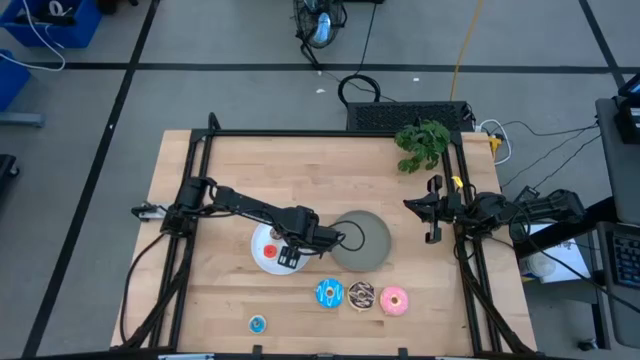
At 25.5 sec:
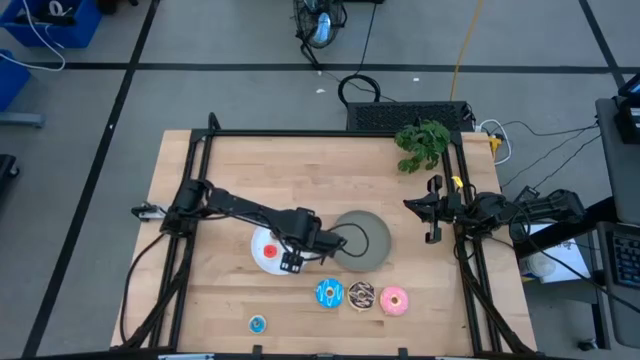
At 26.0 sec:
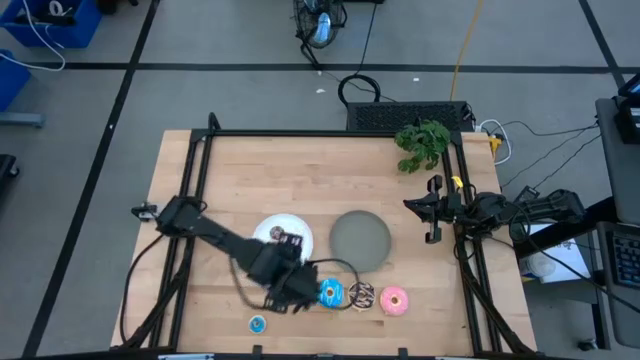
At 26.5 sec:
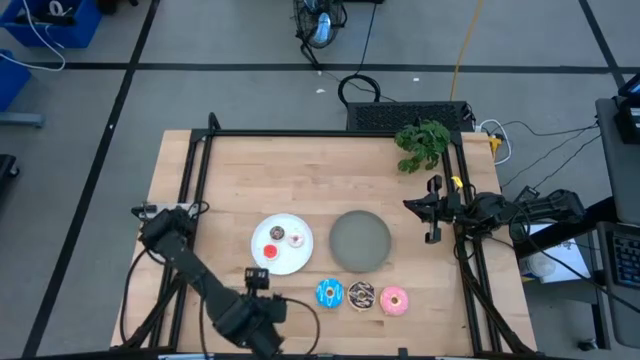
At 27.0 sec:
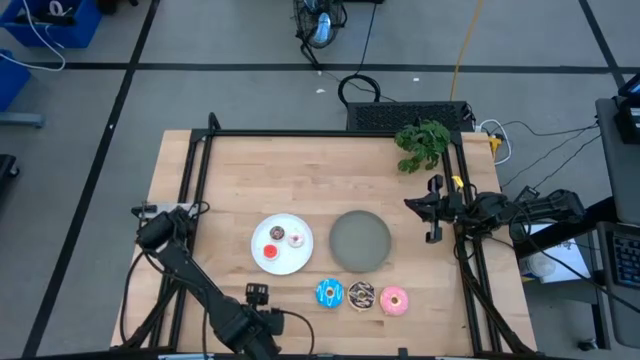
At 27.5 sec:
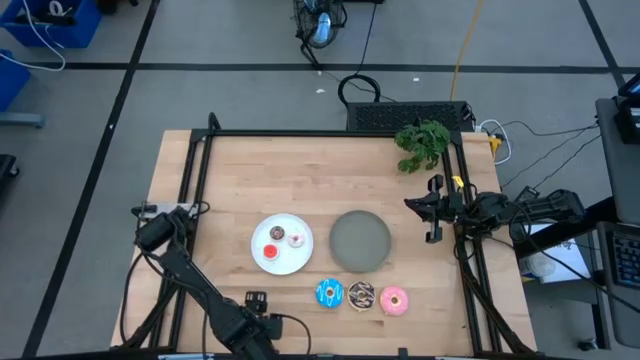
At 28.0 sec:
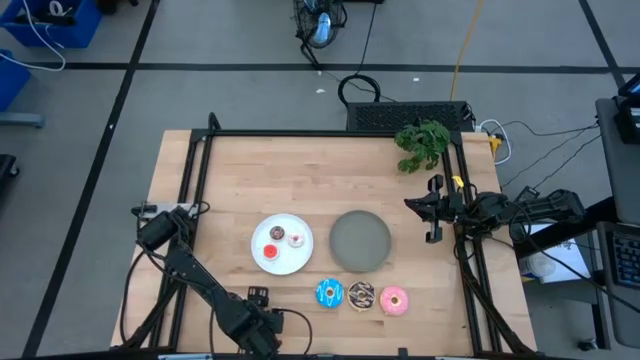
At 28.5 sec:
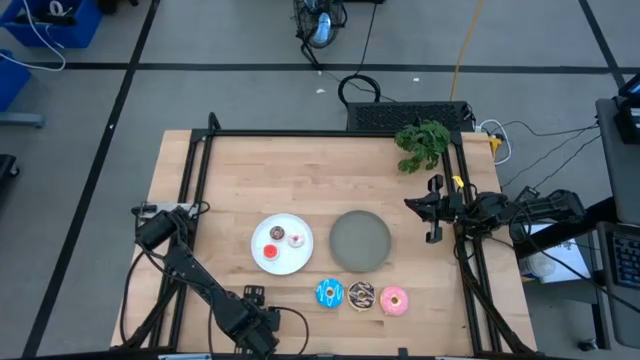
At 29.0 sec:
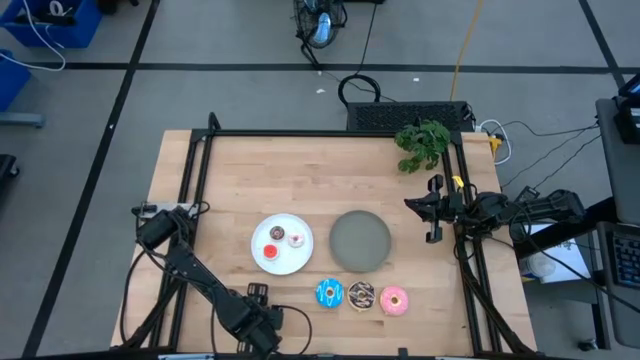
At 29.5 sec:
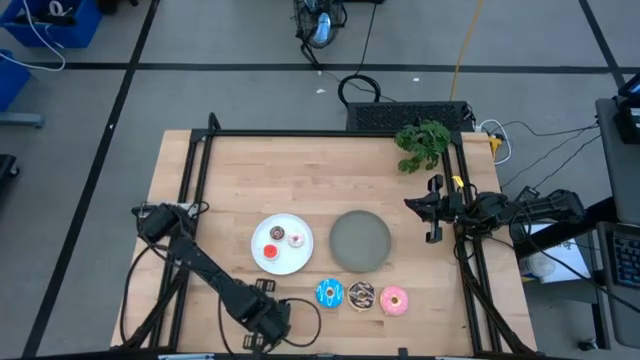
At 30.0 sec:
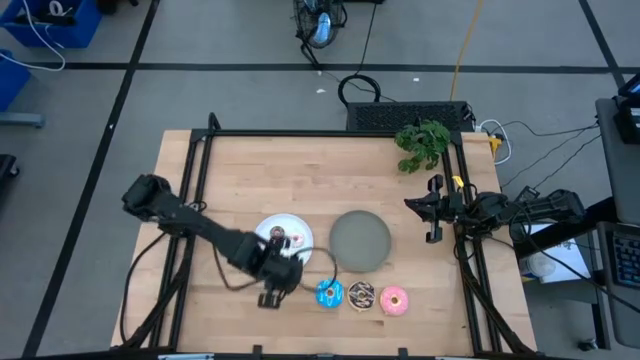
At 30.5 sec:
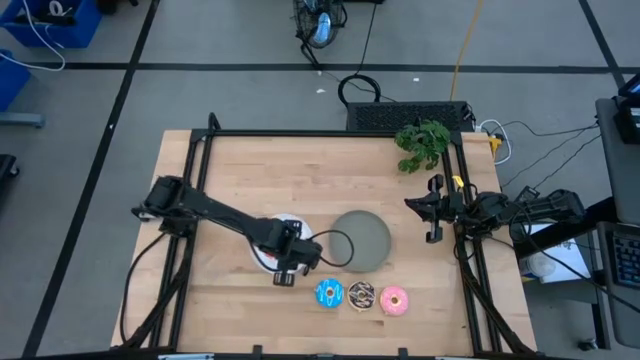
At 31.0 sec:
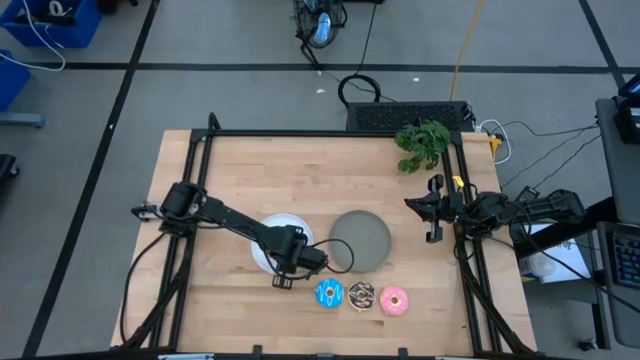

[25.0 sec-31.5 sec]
Task: Pick & Place donuts
Put the small blue donut on the white plate

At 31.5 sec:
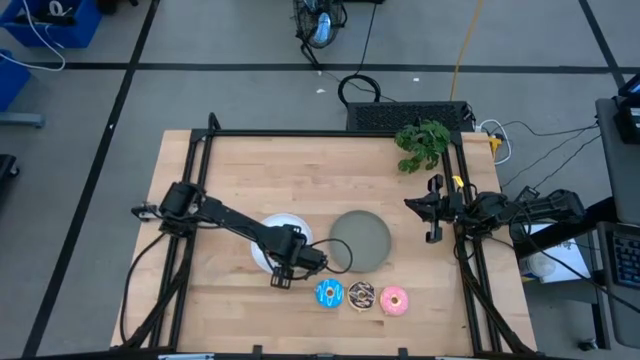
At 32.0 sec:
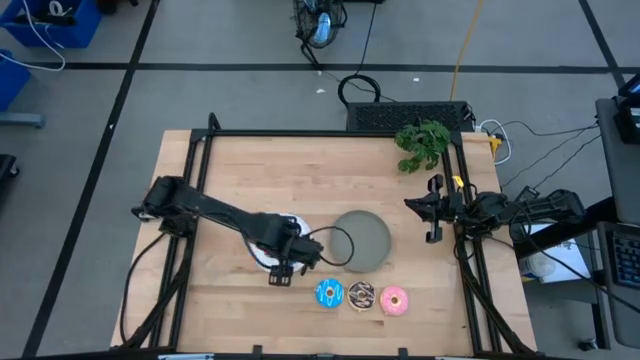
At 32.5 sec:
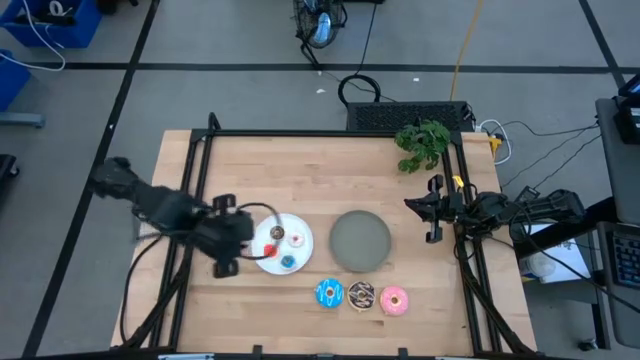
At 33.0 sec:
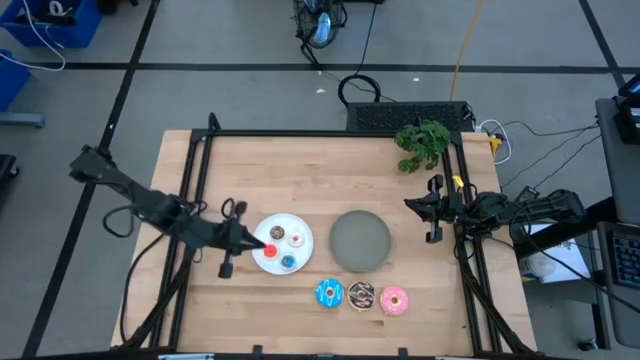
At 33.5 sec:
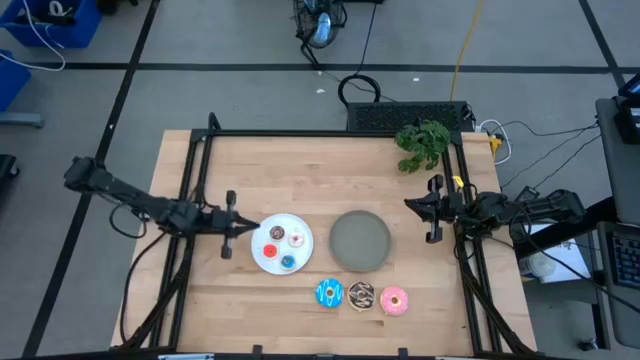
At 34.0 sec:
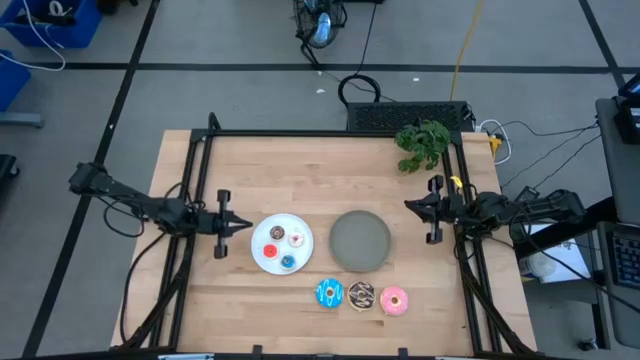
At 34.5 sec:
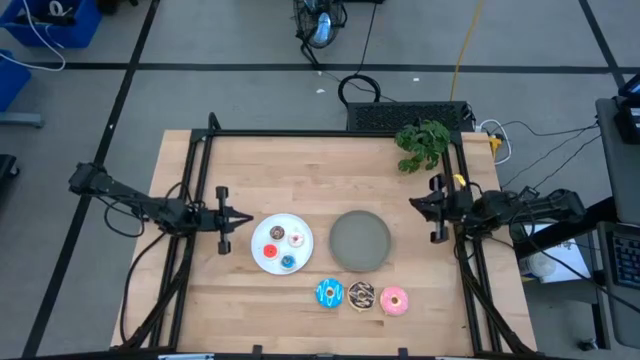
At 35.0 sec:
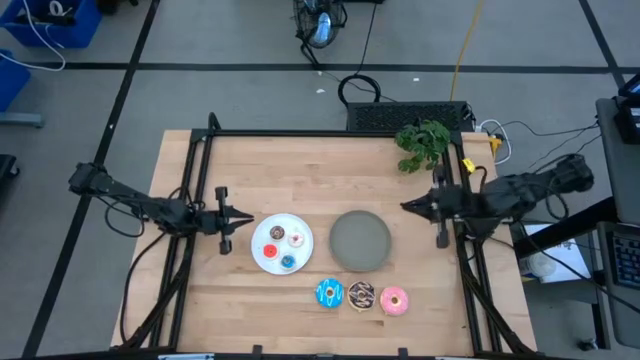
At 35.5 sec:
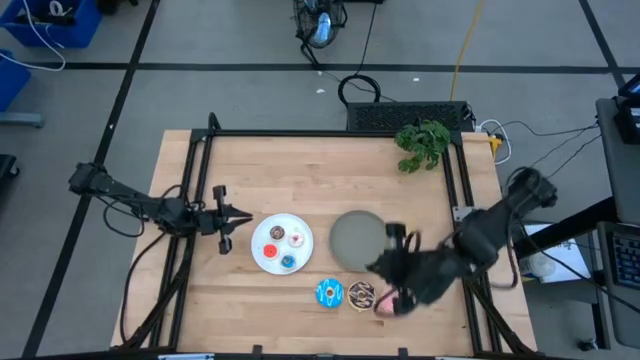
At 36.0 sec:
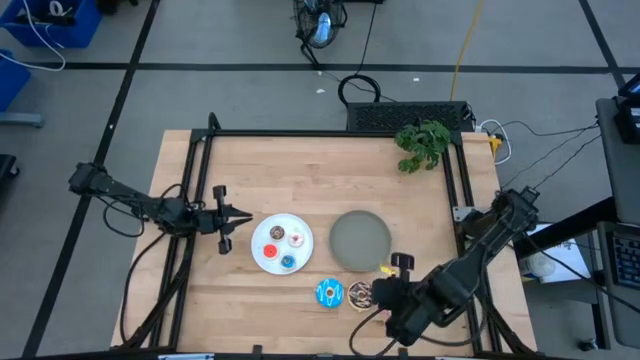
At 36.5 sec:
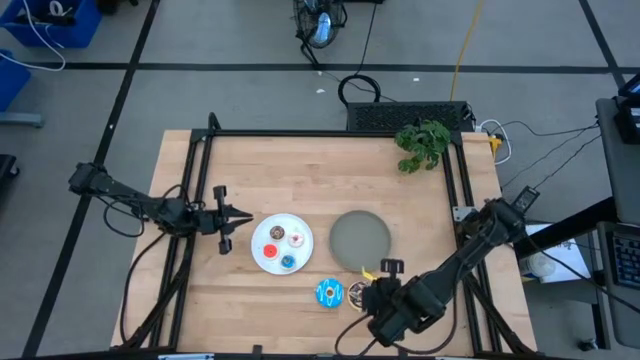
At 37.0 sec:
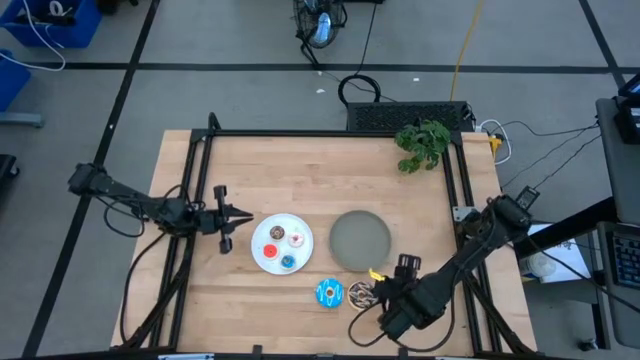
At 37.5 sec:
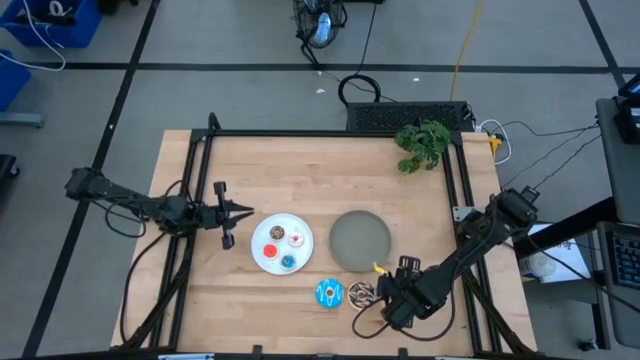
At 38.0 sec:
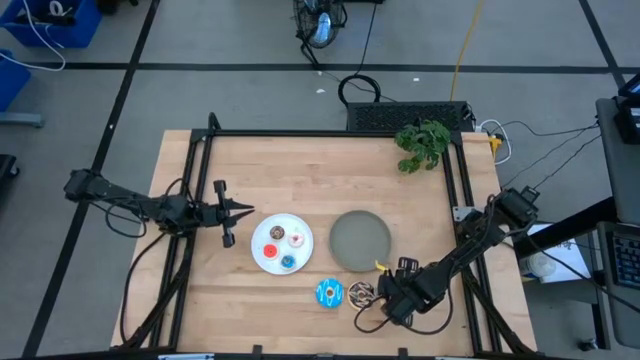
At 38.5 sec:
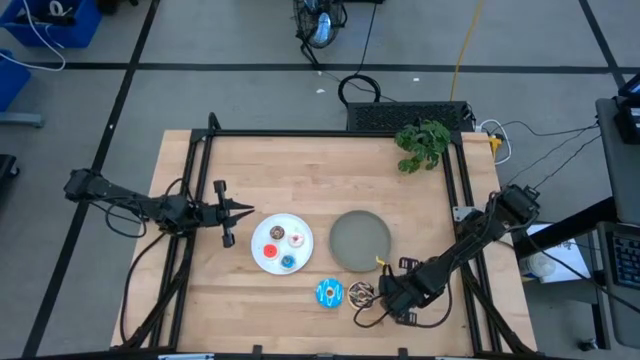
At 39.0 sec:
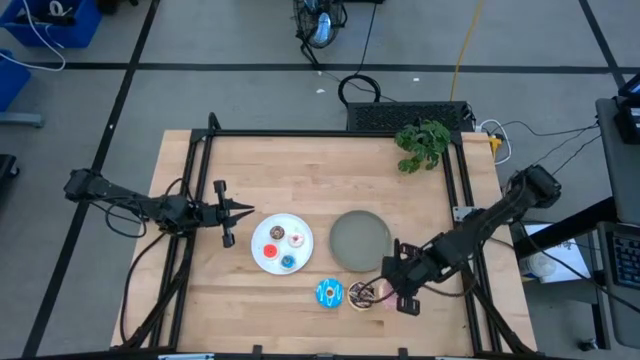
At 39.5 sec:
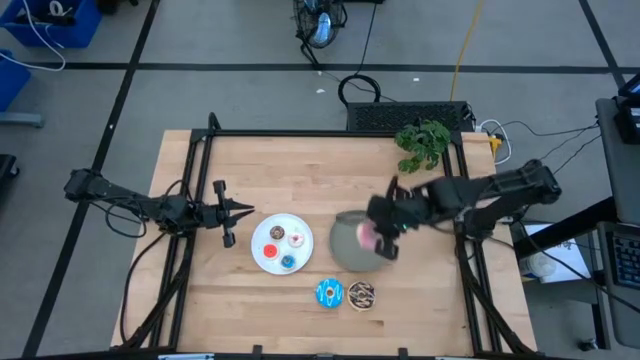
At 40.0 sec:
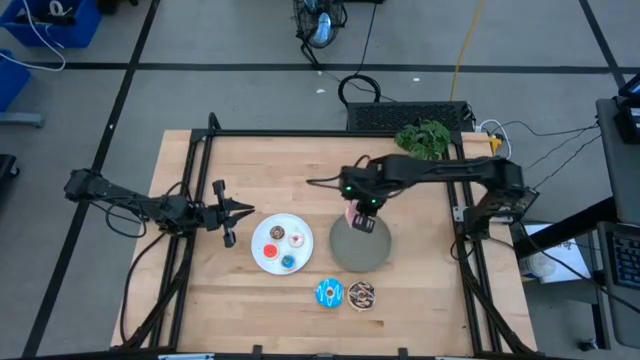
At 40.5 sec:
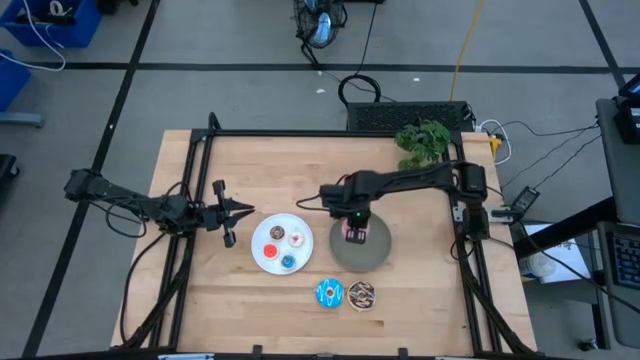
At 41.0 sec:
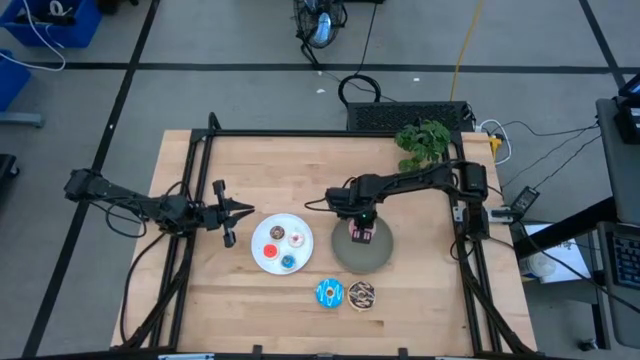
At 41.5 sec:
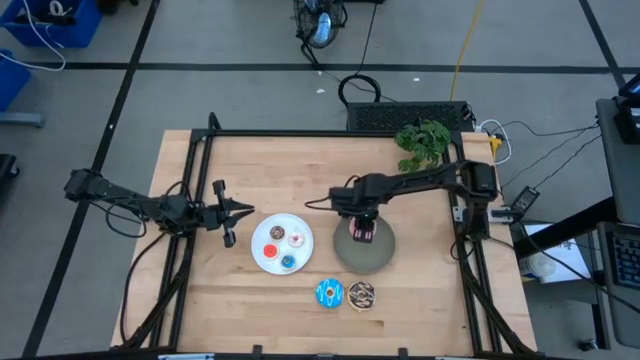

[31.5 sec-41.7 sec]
Put the big pink donut on the gray plate

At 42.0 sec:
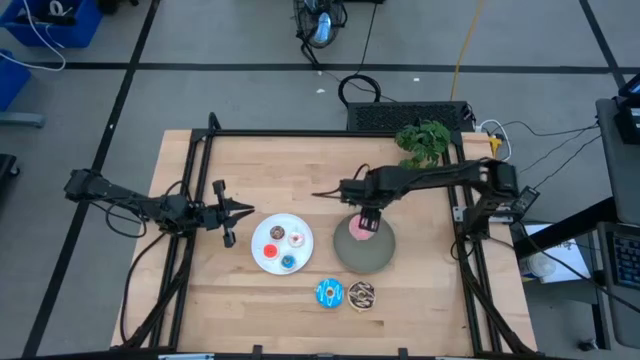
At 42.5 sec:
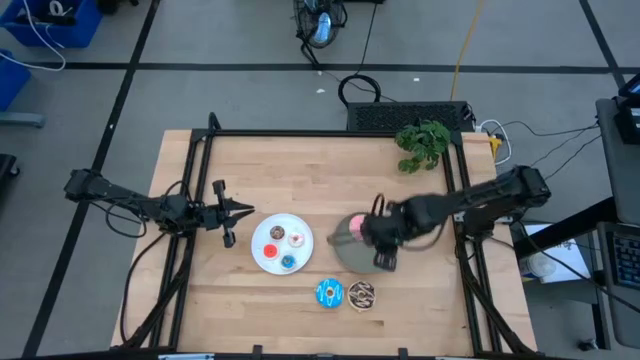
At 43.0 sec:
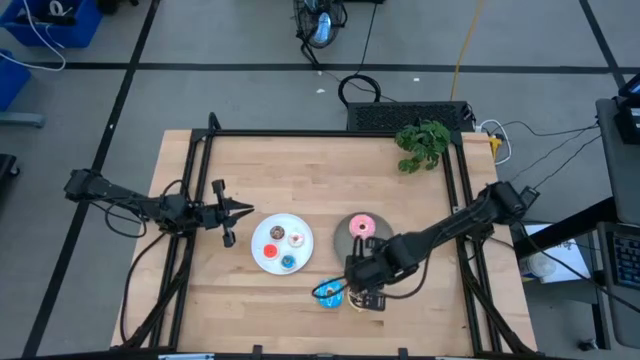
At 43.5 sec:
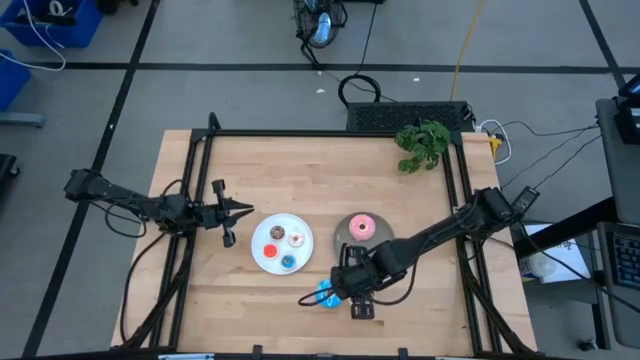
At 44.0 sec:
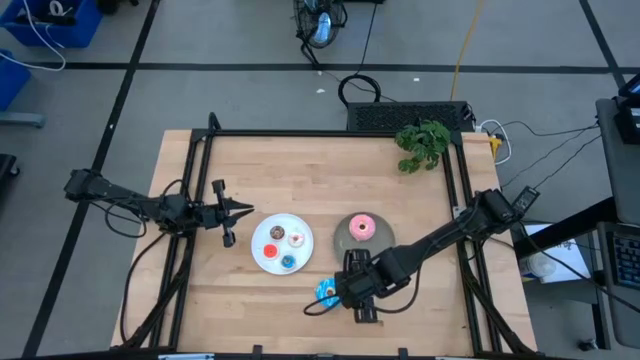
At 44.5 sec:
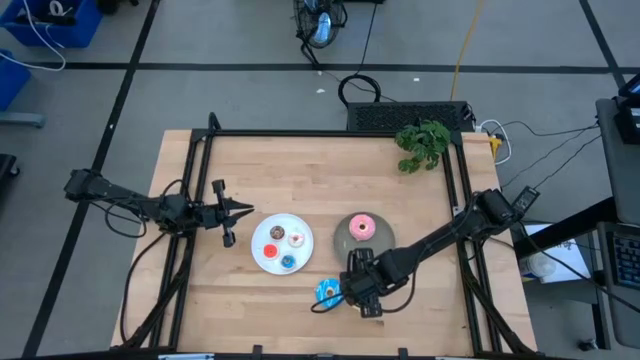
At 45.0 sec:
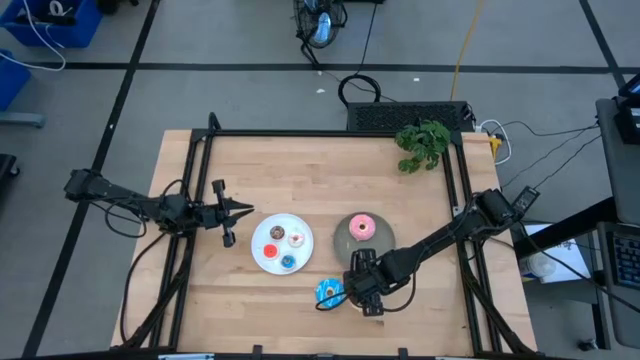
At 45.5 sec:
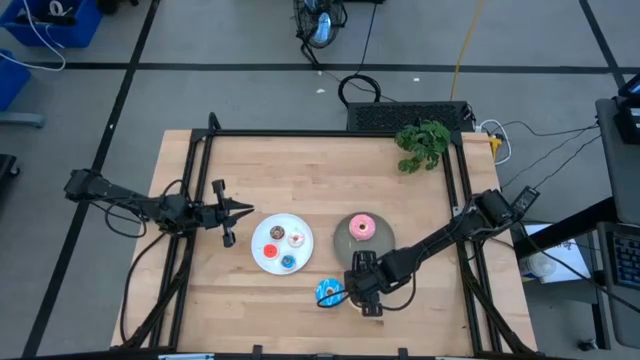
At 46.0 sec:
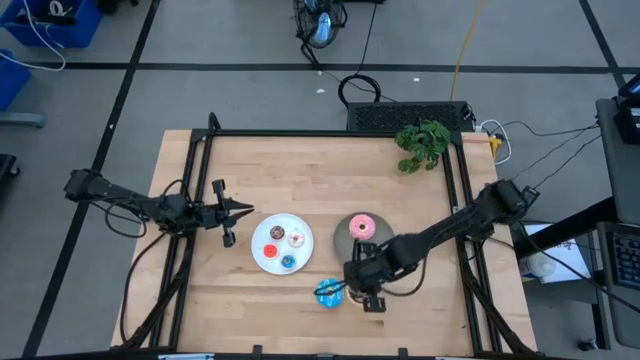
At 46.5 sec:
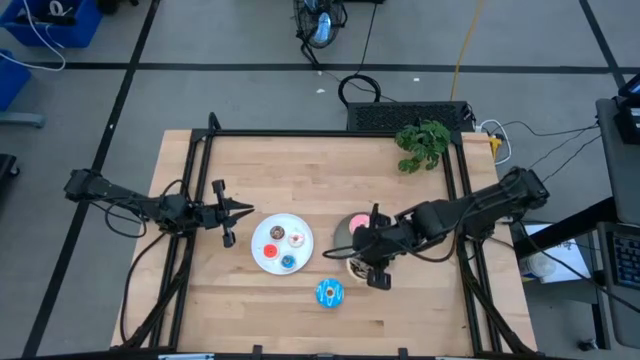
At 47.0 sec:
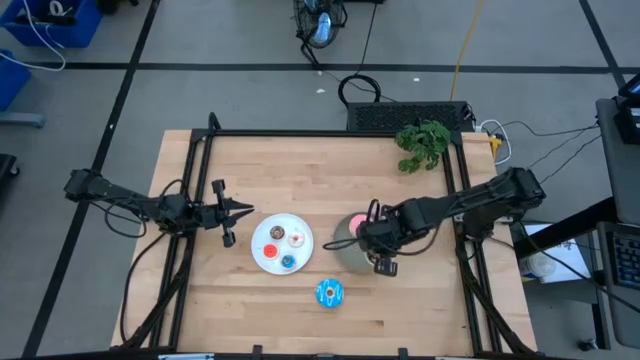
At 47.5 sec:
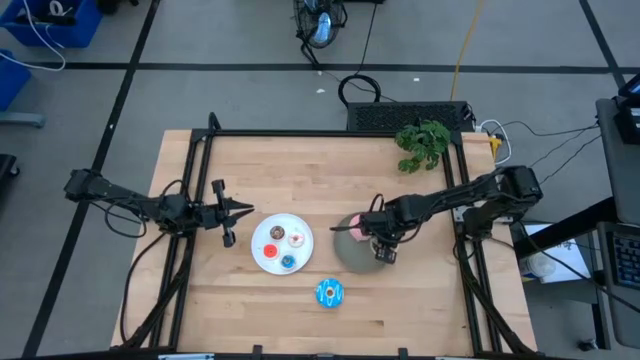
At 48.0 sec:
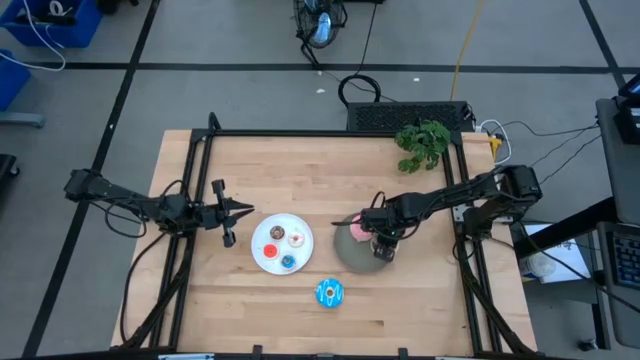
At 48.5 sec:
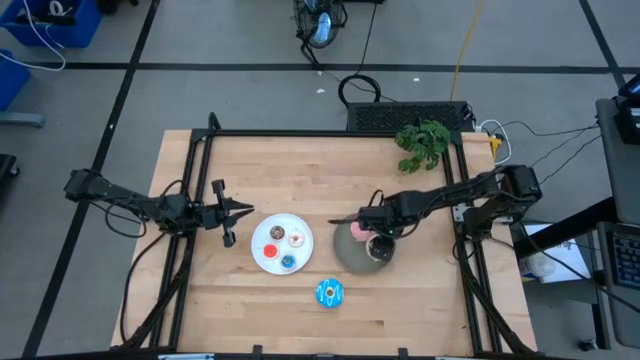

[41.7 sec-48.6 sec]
Put the big brown donut on the gray plate
